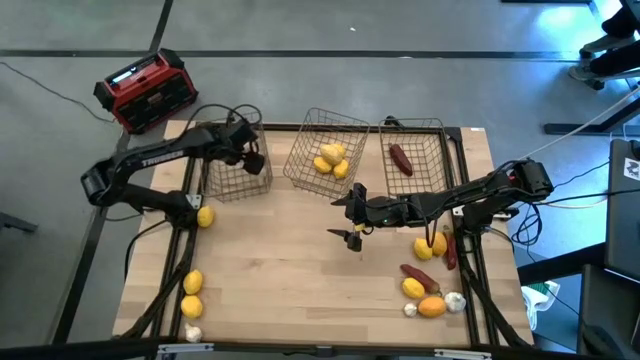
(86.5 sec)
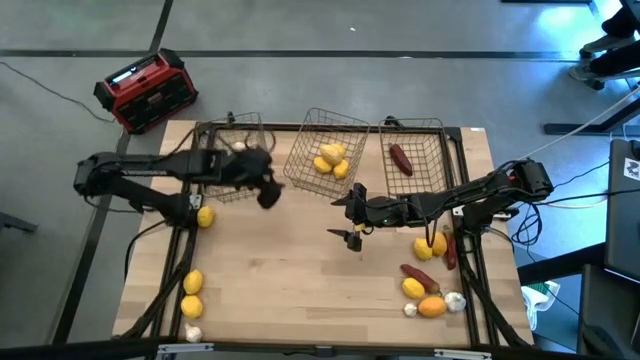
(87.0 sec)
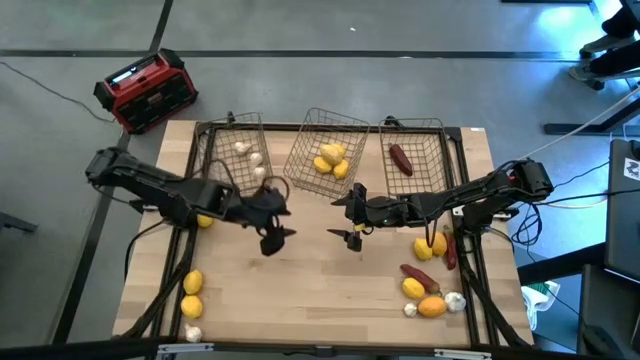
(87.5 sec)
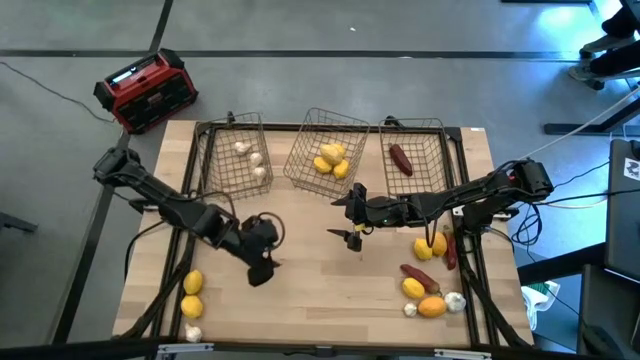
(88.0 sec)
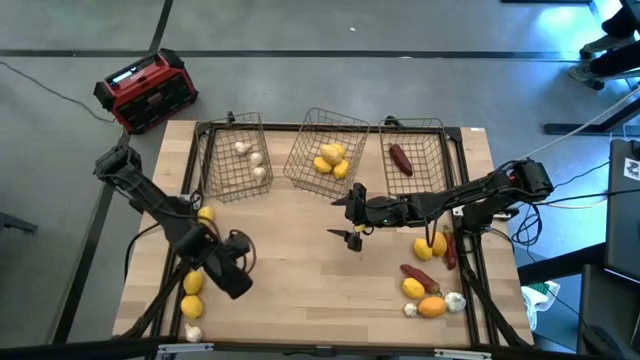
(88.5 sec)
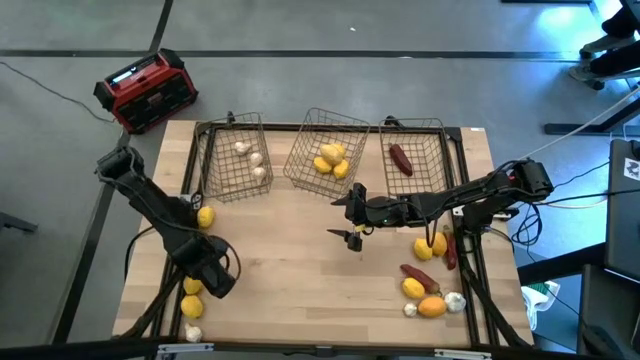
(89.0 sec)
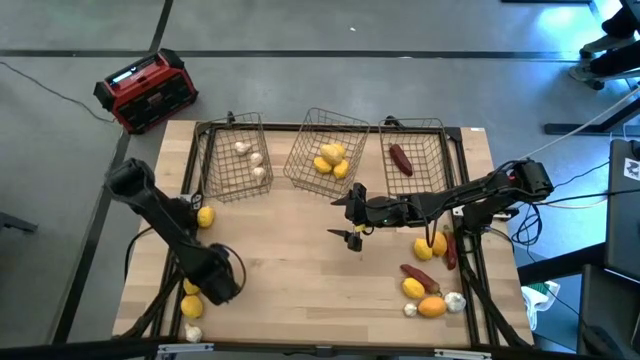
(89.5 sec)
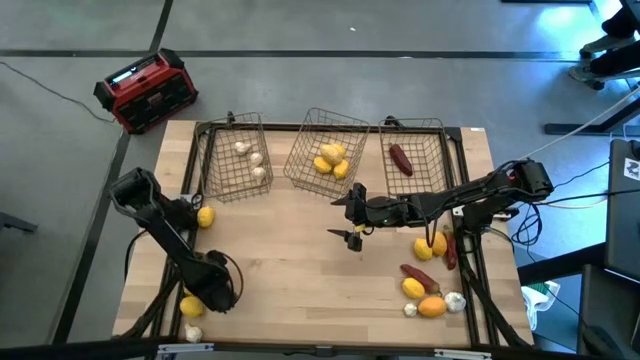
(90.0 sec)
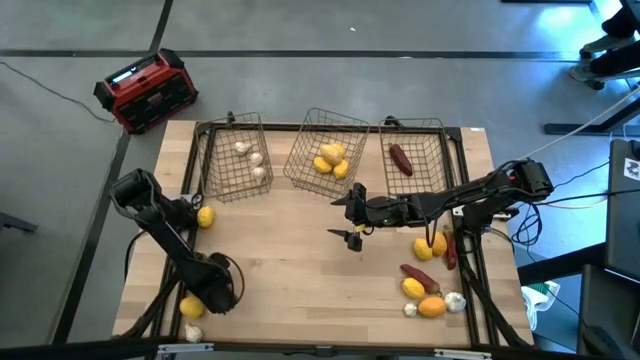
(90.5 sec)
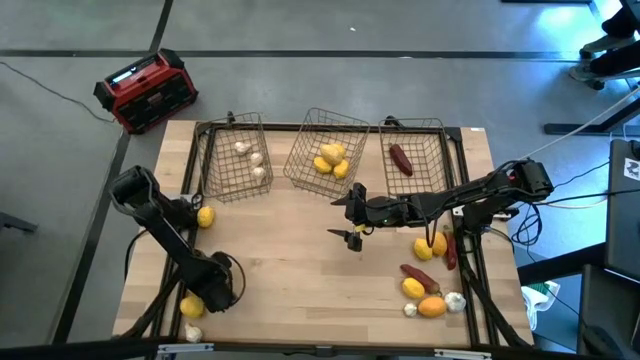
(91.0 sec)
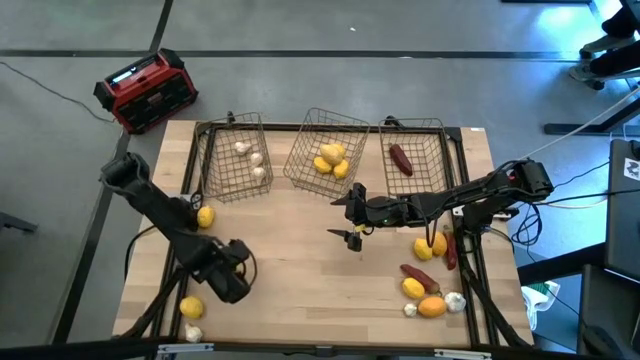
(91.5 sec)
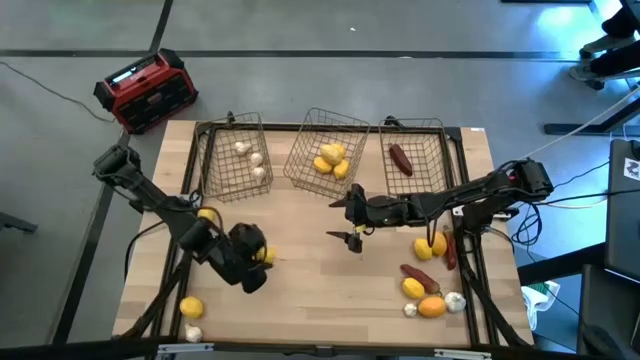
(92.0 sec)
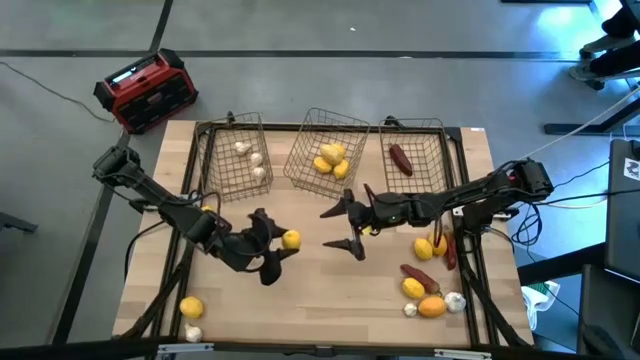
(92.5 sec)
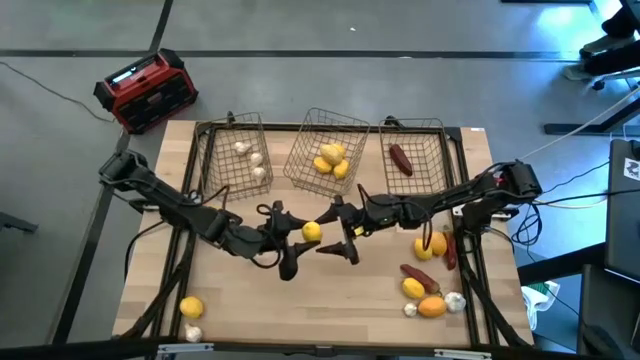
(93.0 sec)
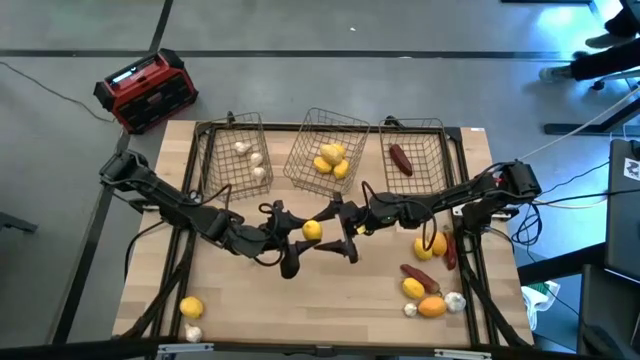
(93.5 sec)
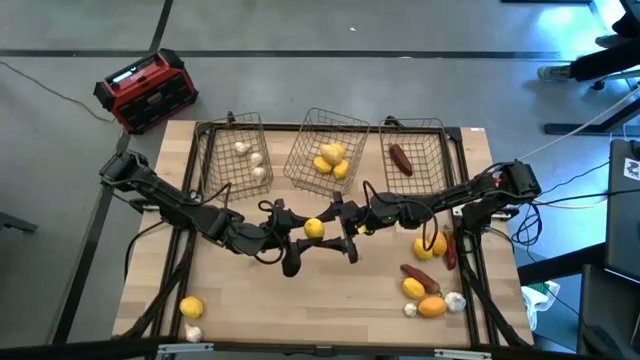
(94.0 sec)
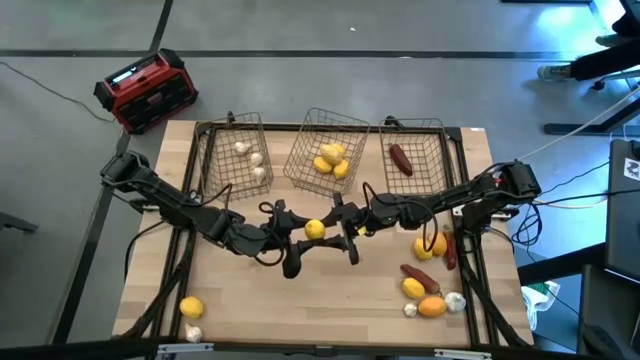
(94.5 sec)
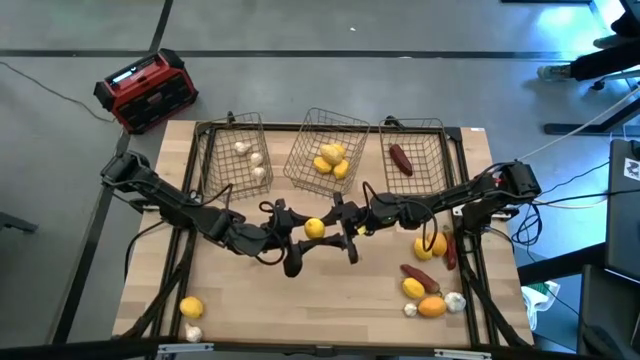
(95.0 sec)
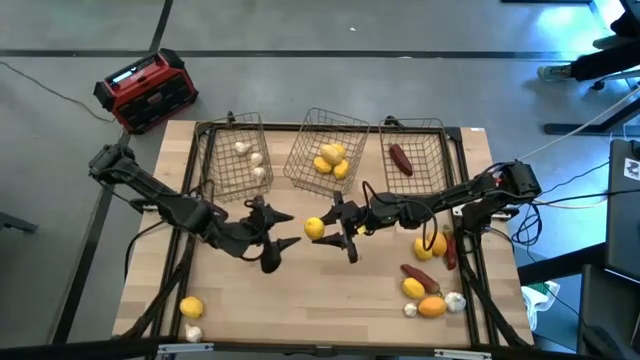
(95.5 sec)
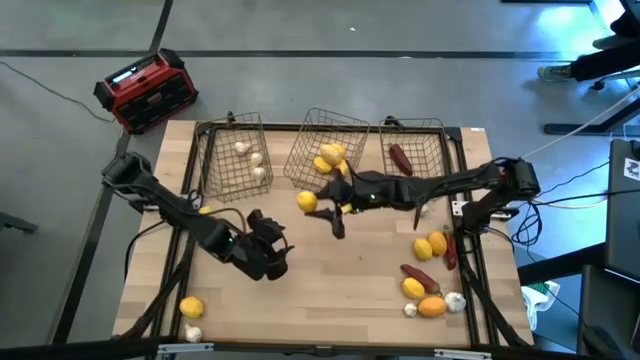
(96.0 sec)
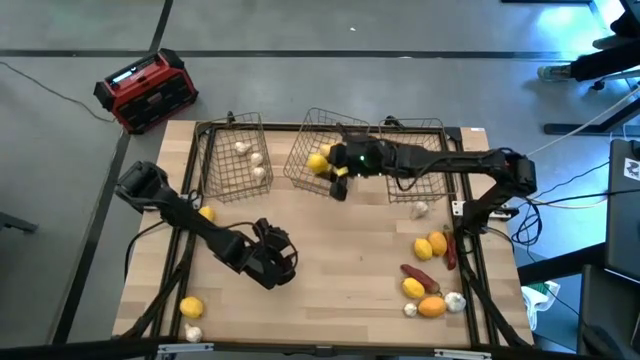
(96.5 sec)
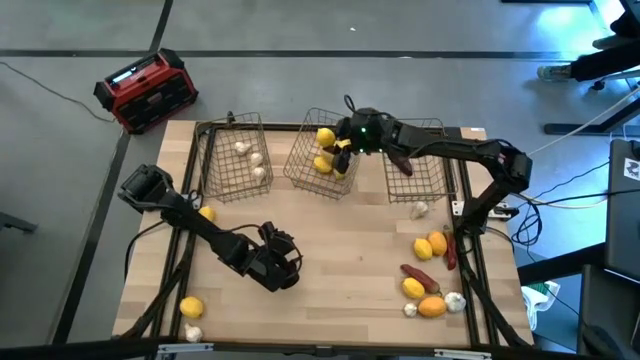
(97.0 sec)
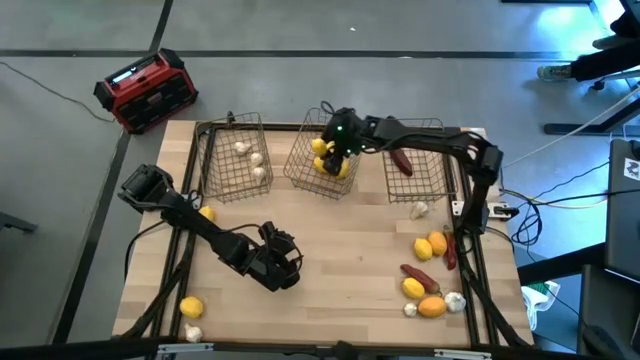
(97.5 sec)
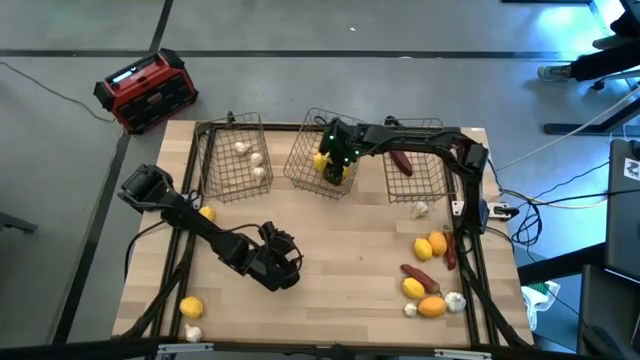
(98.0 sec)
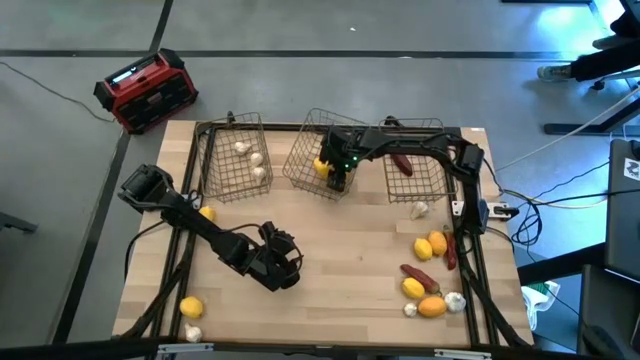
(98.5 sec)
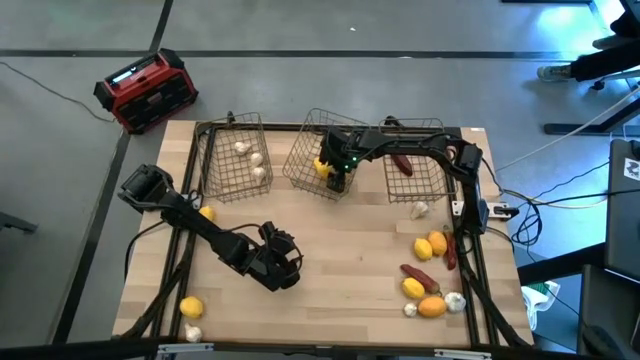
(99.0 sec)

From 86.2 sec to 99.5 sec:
Task: Sort produce into baskets
Put the lemon into the middle wire basket

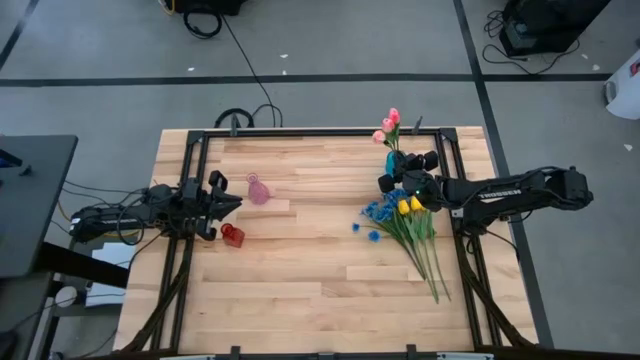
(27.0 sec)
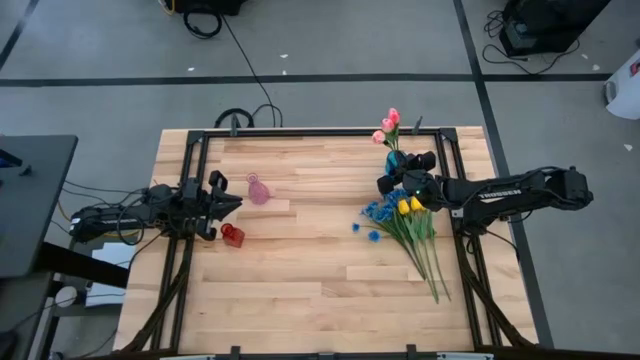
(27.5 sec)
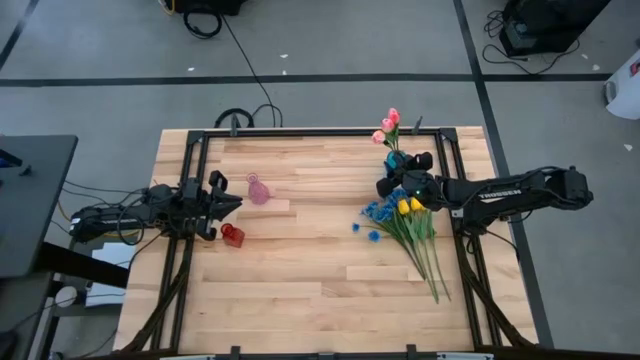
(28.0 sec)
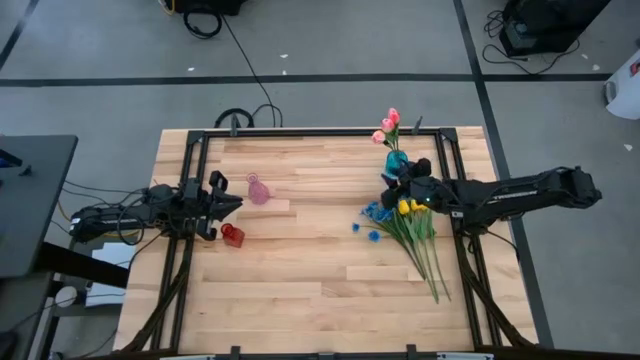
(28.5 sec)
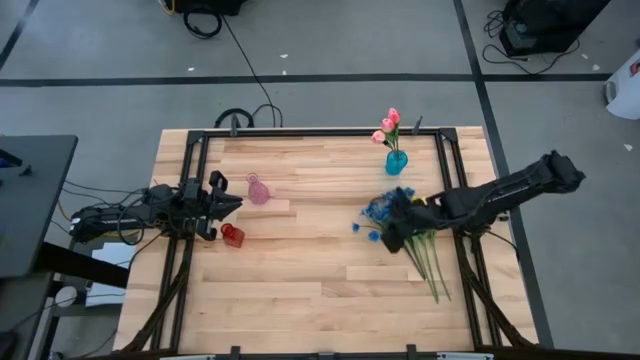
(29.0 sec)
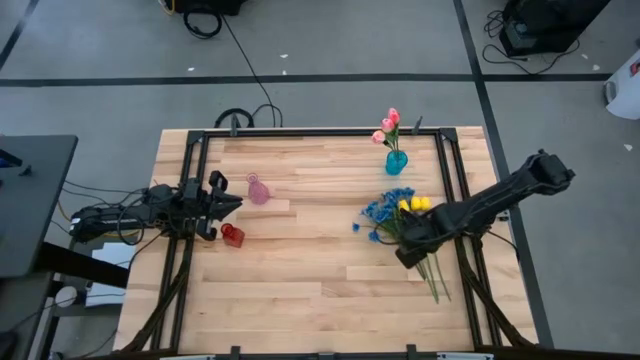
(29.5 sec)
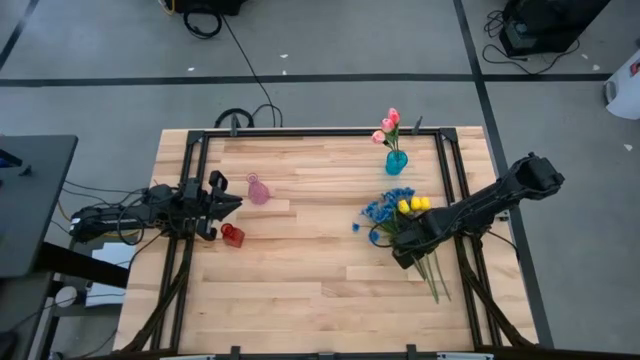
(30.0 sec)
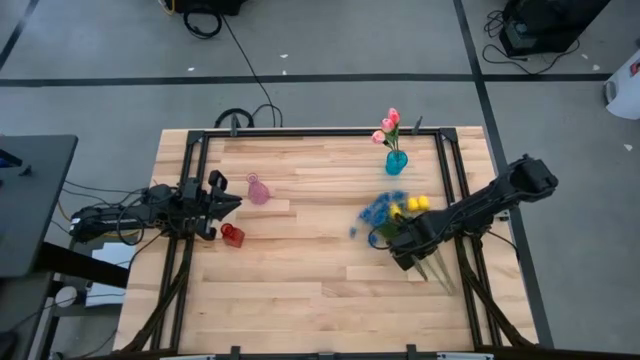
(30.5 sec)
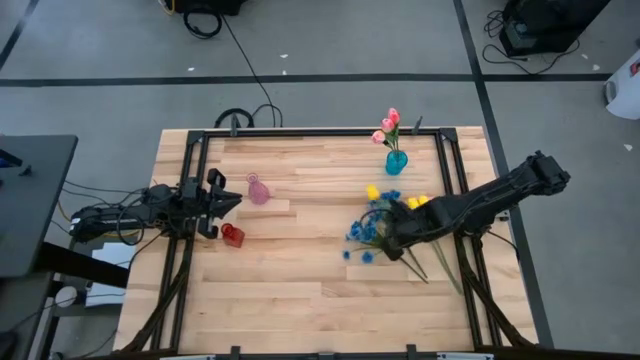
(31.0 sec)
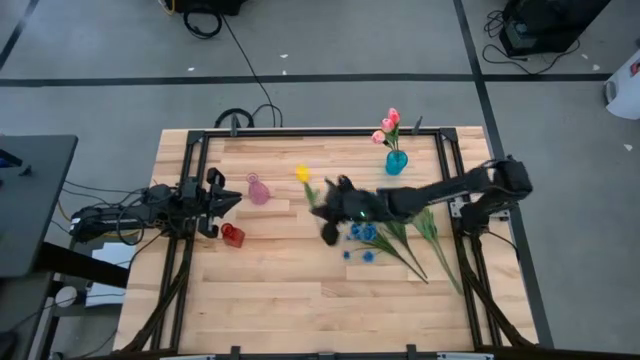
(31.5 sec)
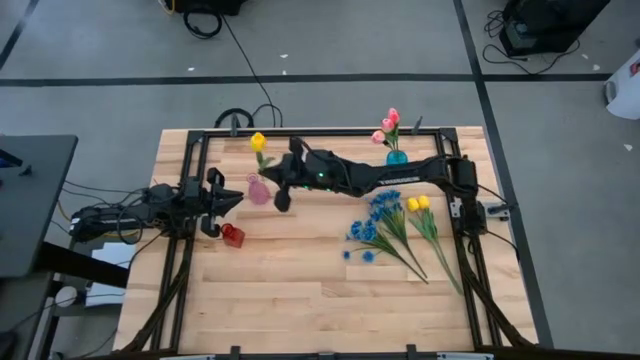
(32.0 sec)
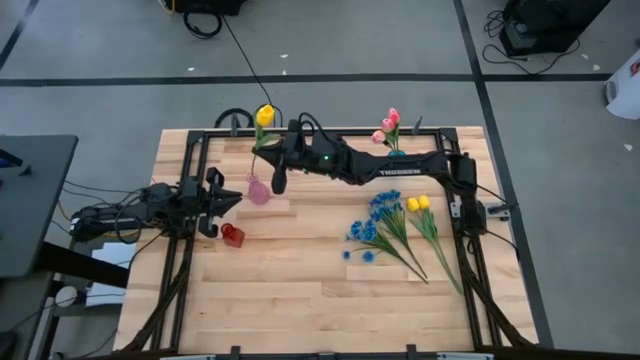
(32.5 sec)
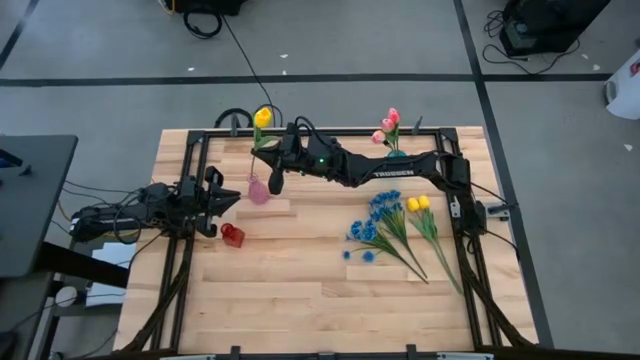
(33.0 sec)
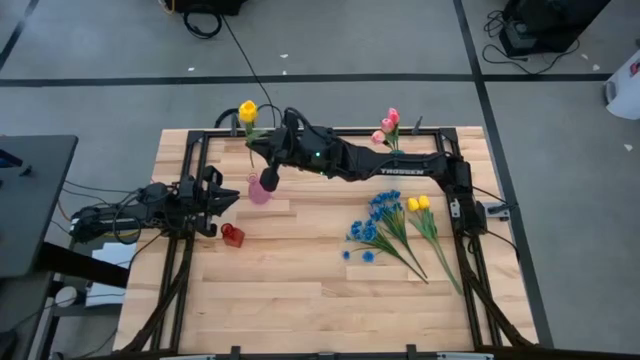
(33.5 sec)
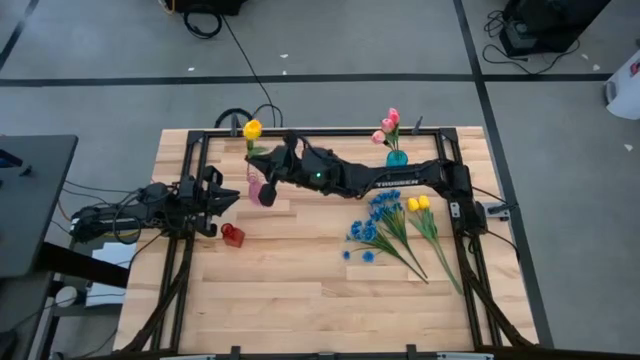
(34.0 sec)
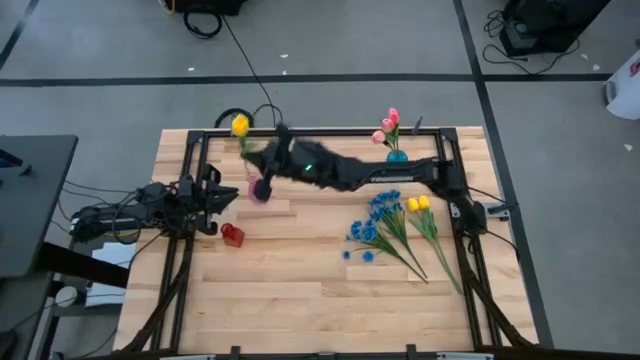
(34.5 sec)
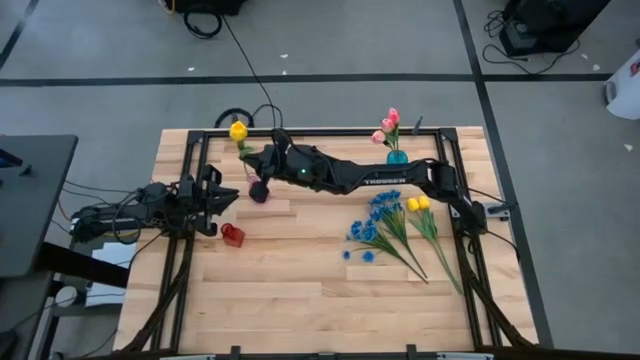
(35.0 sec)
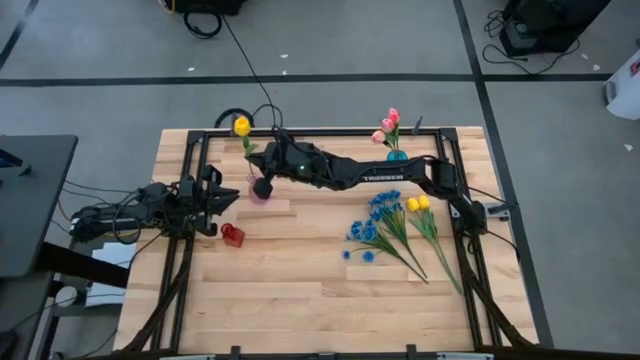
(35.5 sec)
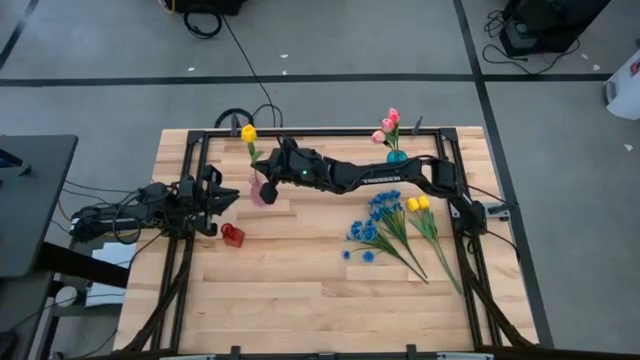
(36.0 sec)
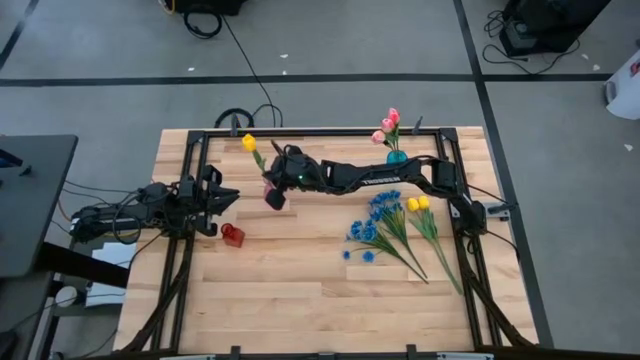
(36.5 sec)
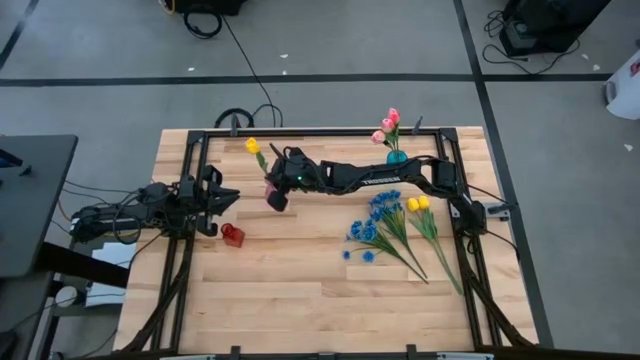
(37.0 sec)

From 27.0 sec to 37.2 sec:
Task: Sort flowers into vase by color
Put the left yellow flower into the pink vase
